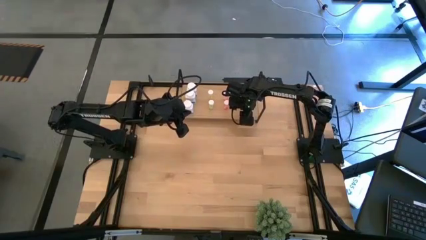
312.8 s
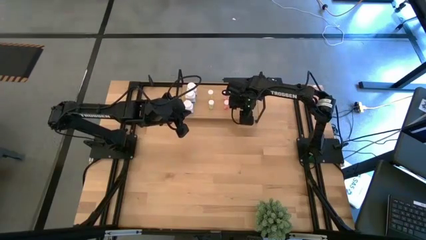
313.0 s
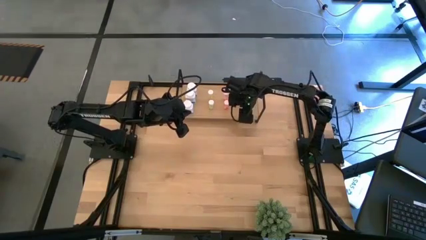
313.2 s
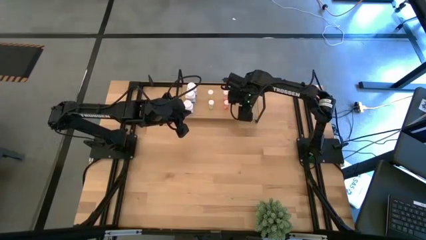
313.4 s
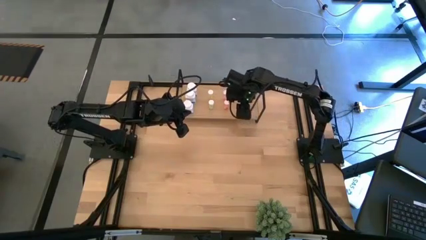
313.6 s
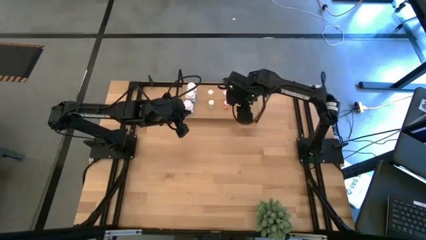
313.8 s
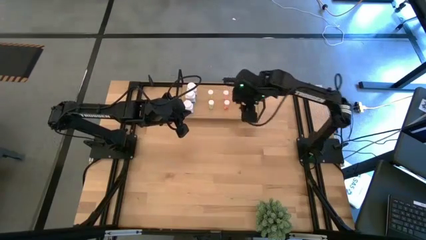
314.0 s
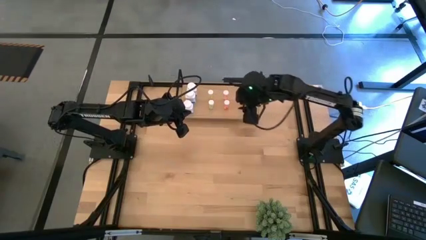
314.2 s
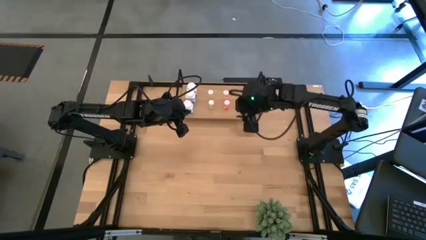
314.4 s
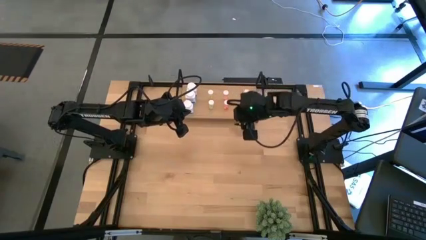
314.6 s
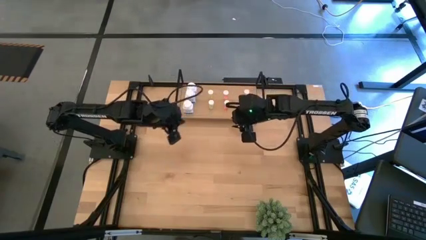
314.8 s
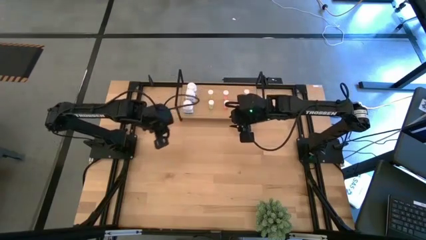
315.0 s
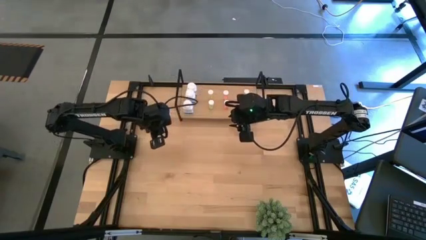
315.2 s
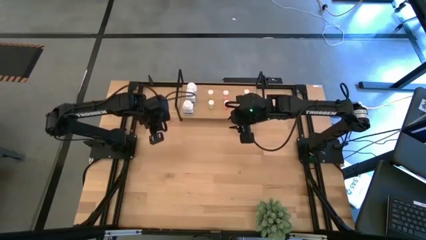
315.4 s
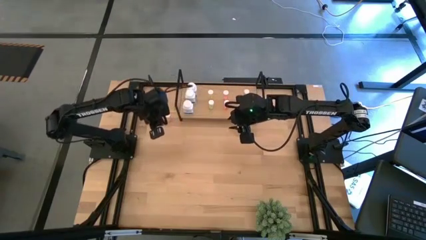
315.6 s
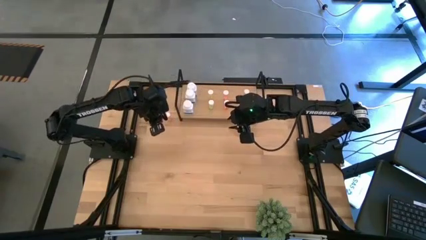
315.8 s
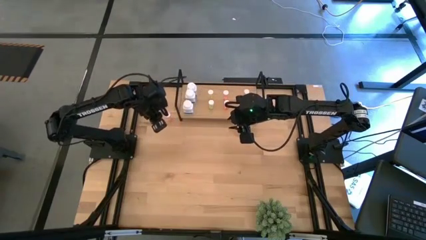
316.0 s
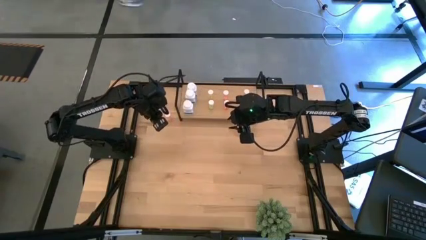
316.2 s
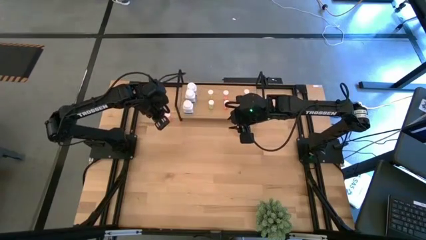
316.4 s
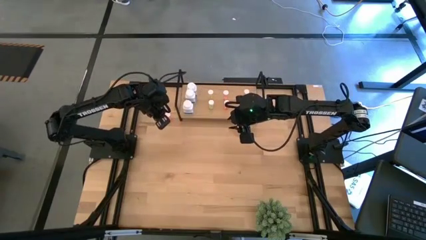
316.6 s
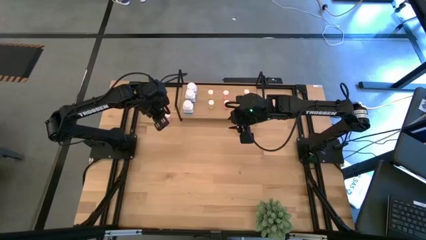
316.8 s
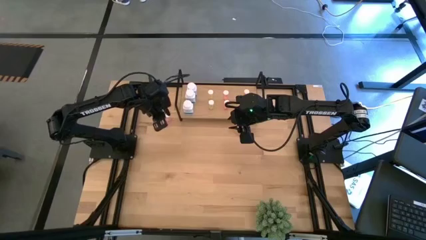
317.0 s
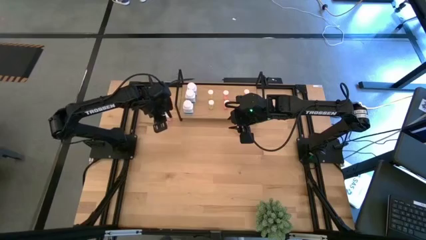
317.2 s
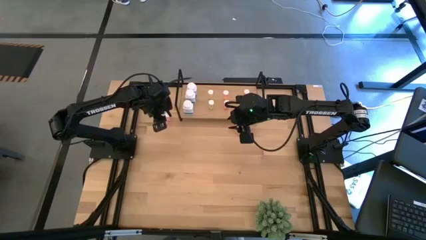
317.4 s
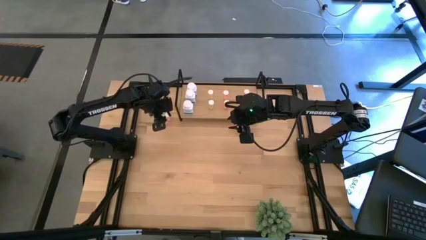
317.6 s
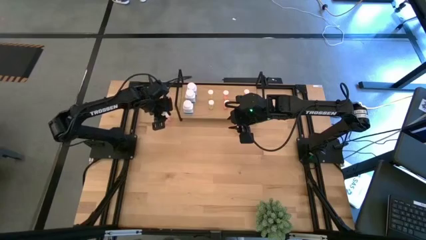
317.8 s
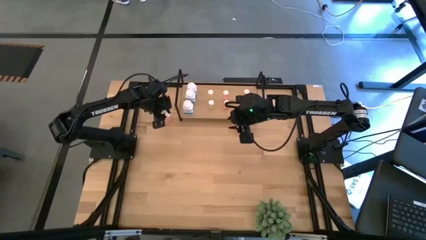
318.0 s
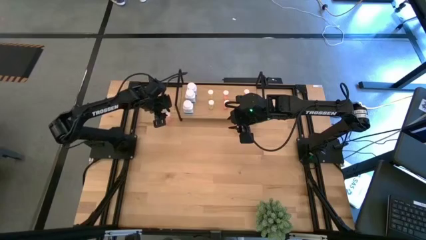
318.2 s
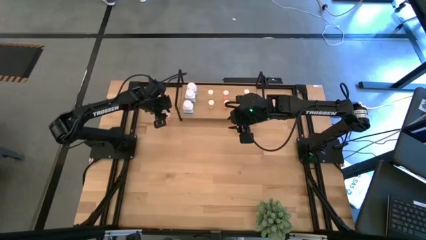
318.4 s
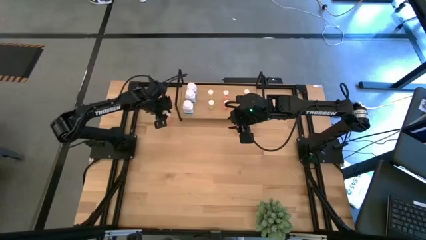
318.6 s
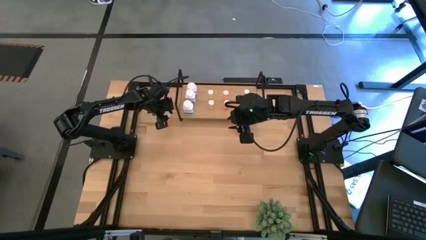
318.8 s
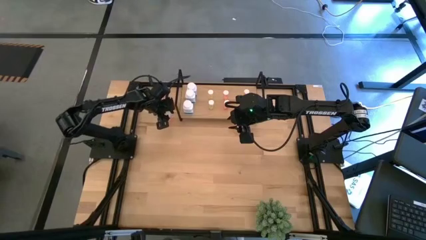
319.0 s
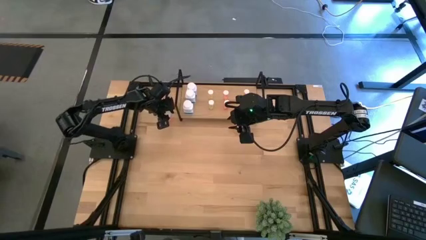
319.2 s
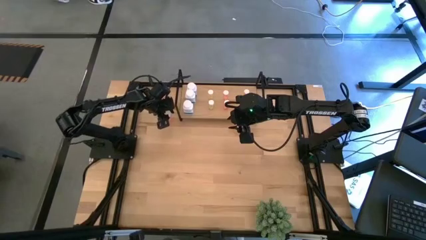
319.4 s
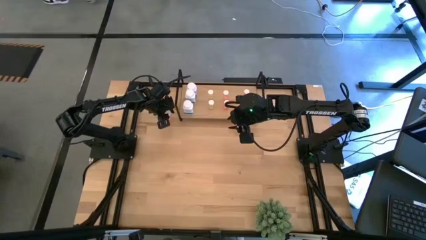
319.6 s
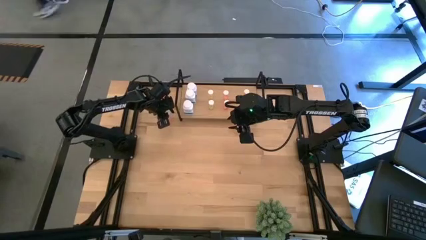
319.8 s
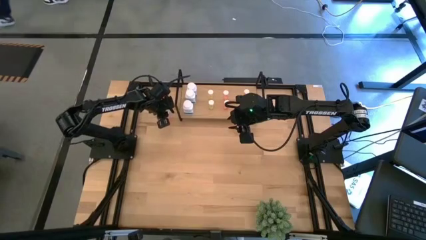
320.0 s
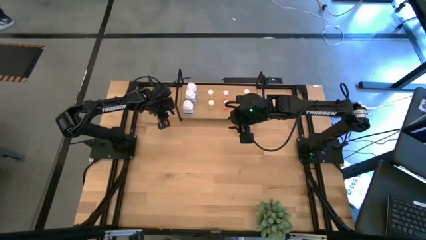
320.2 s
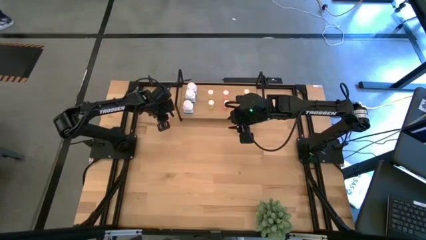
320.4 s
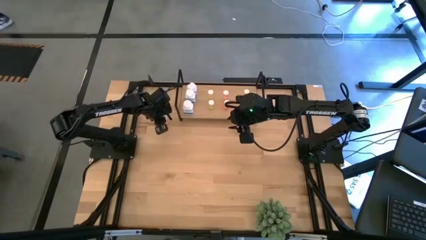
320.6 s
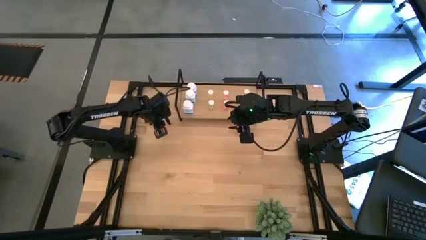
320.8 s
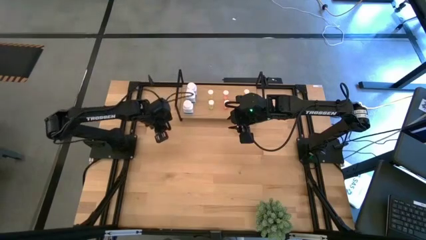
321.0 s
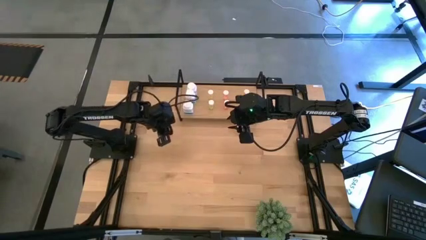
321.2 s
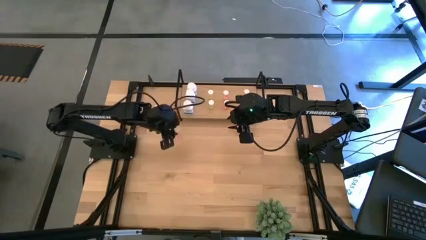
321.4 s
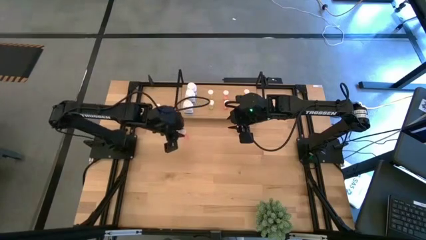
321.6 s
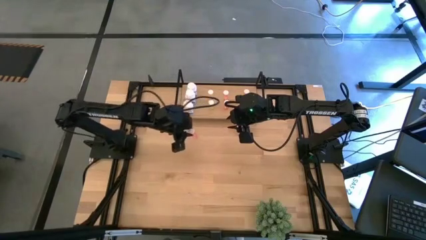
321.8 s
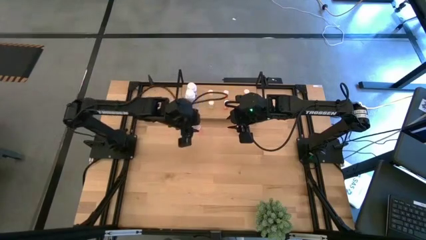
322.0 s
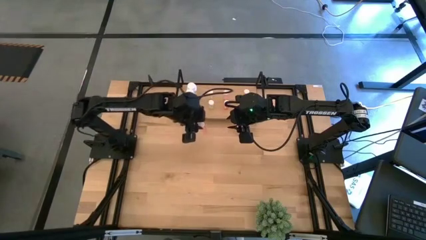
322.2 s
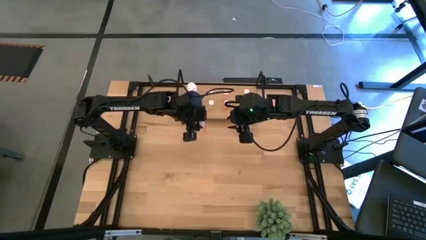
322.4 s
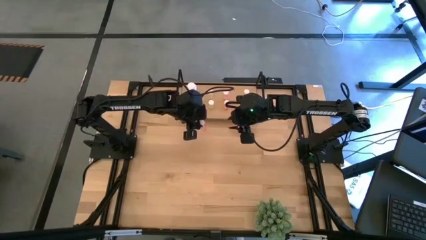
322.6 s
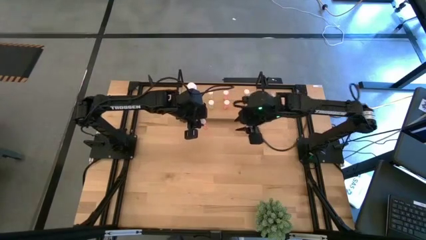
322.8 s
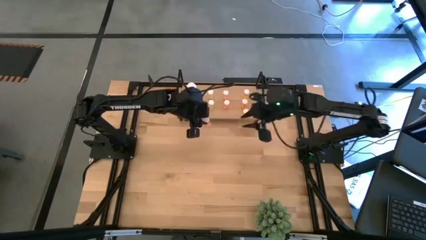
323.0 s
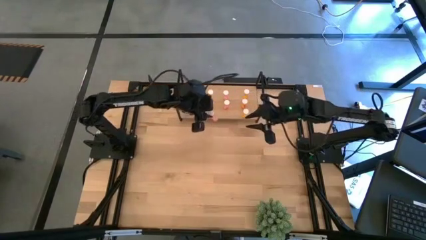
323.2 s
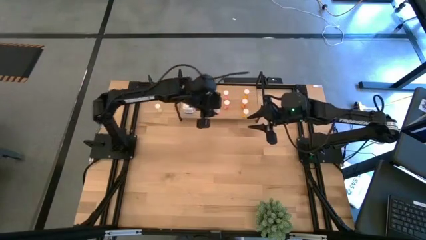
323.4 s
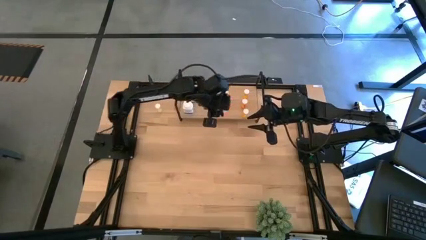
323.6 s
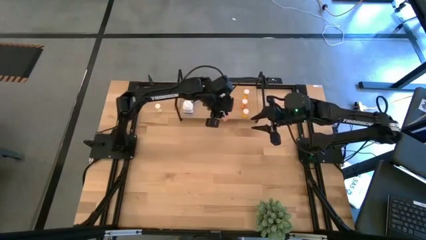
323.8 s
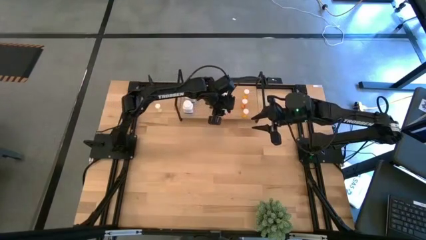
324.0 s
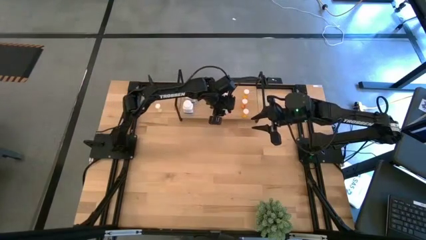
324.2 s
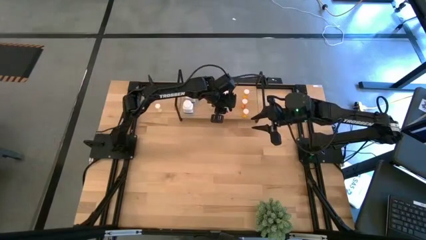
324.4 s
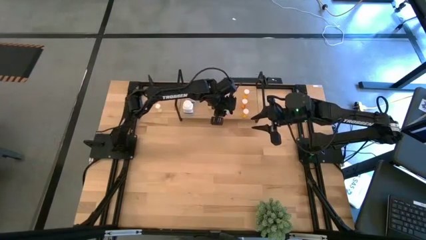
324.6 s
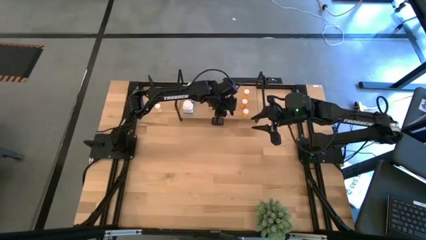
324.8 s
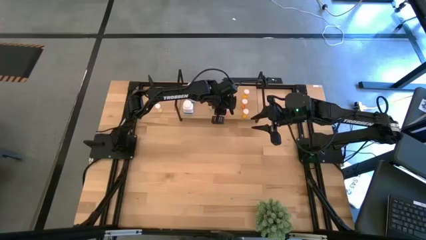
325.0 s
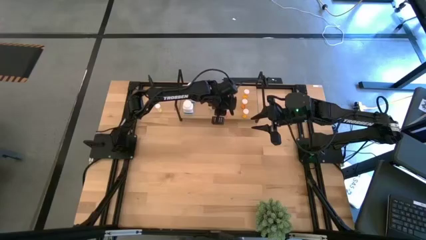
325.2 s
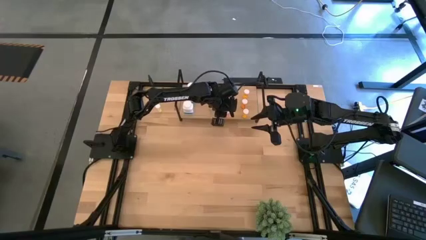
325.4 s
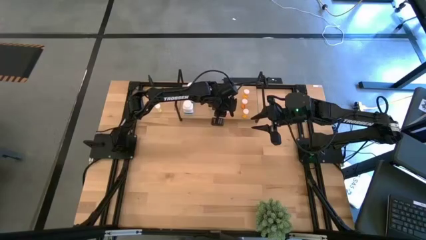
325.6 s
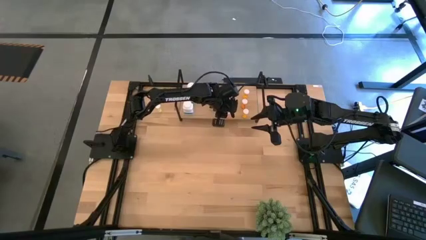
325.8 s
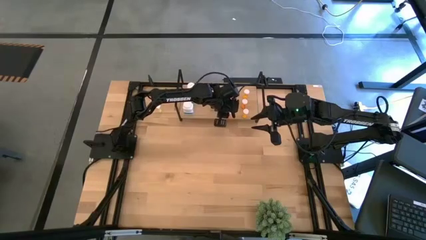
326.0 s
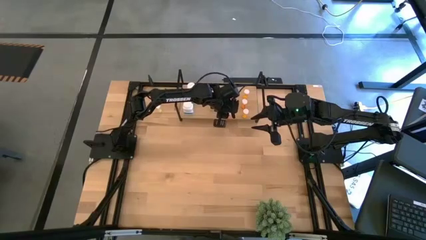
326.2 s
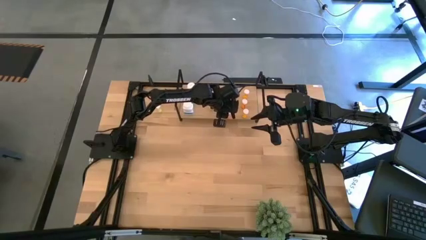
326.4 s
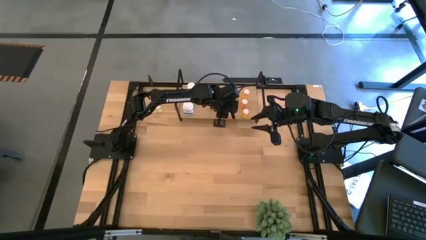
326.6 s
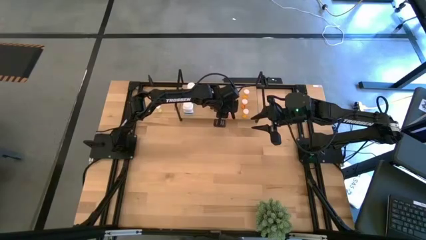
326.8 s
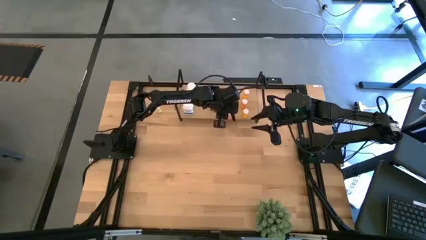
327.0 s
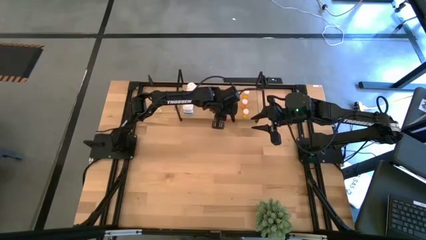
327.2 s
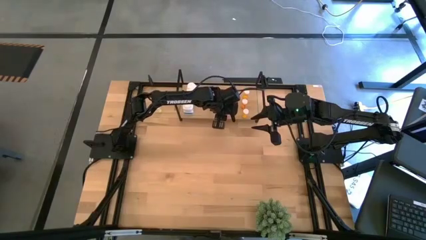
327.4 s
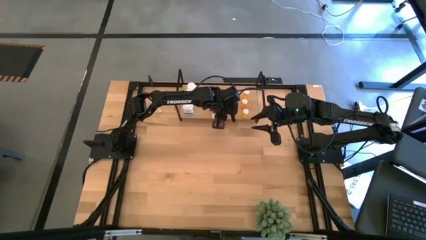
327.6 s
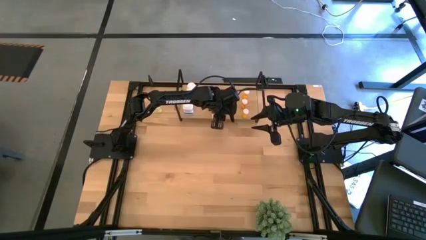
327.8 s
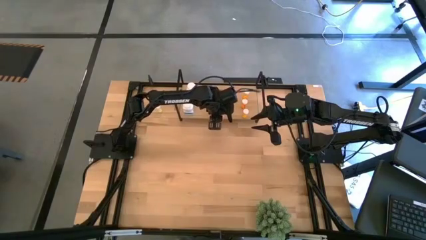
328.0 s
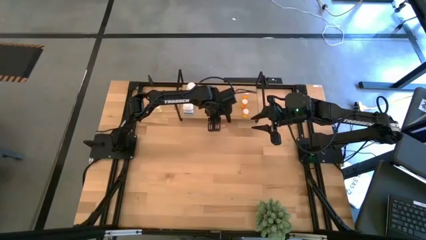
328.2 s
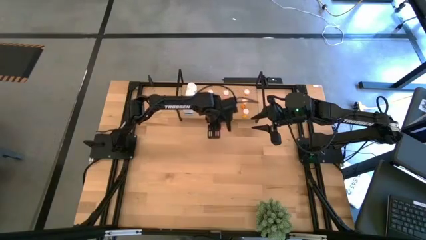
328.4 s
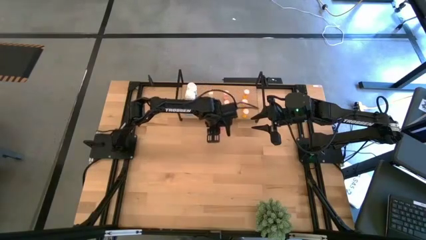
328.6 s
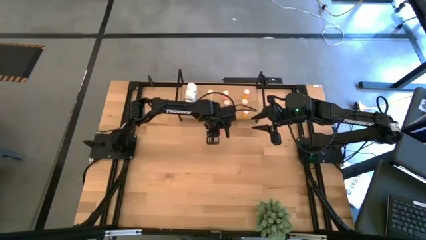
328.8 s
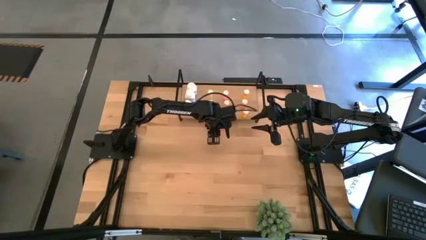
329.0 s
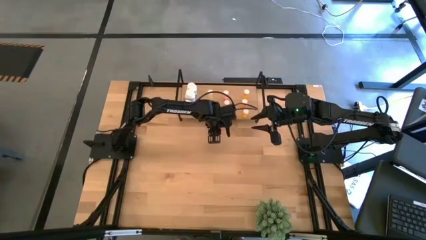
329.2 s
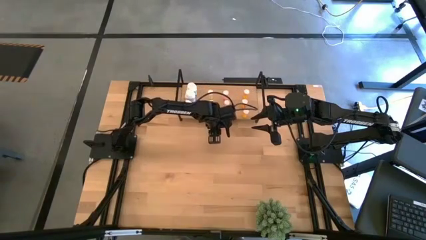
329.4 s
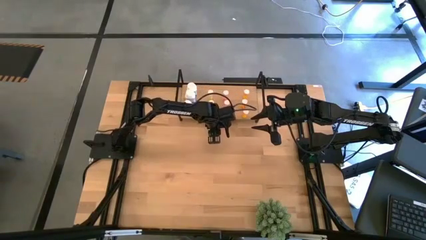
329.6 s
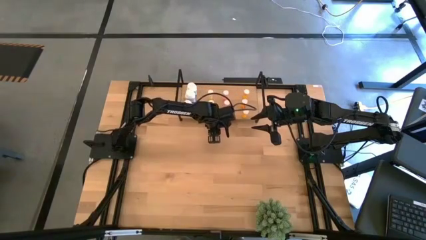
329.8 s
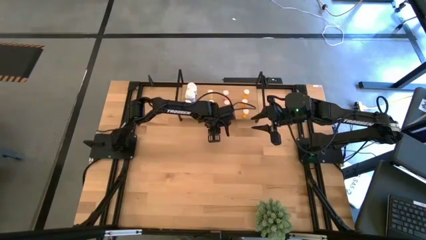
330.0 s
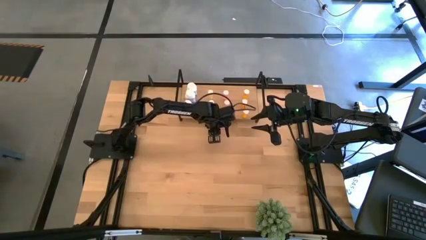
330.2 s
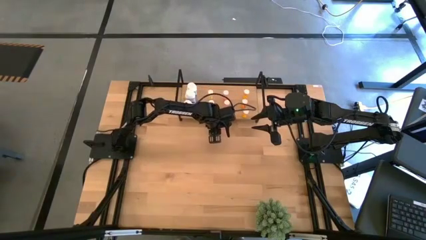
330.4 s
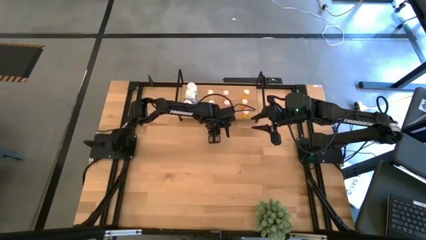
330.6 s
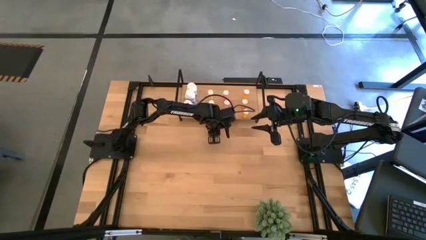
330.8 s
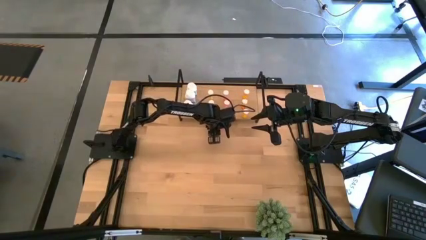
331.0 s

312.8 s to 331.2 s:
Task: Pick and place medicine bottles onto shelf by color
Put the red pill bottle on the shelf aligned with the other red pill bottles
